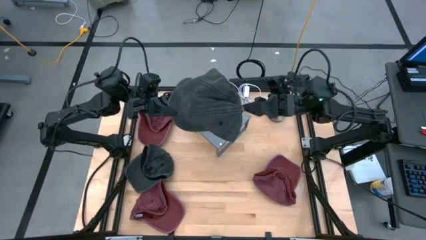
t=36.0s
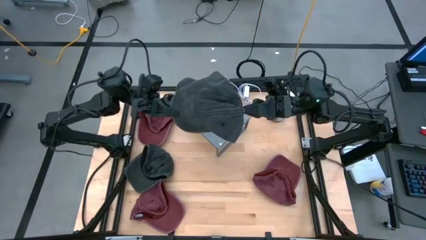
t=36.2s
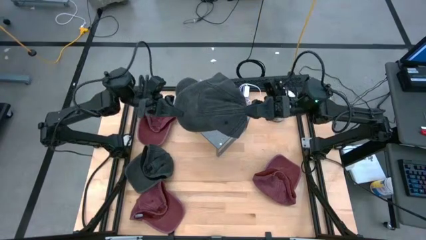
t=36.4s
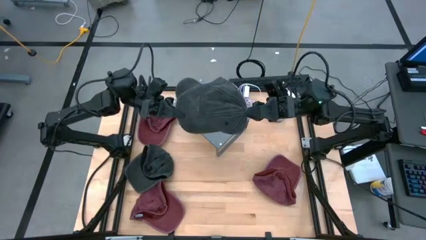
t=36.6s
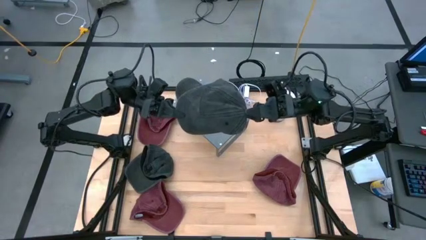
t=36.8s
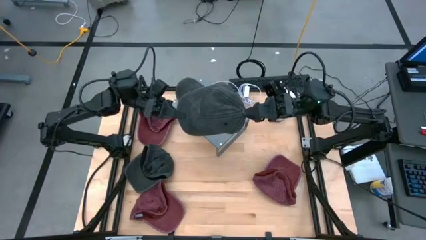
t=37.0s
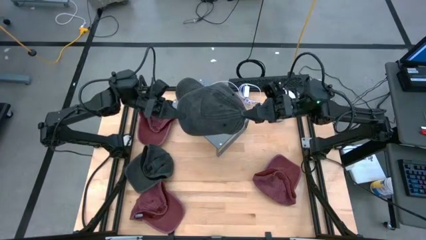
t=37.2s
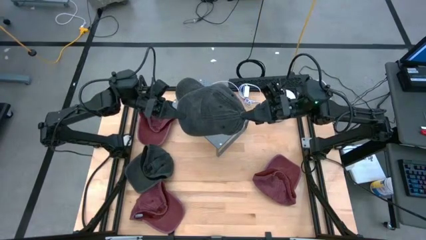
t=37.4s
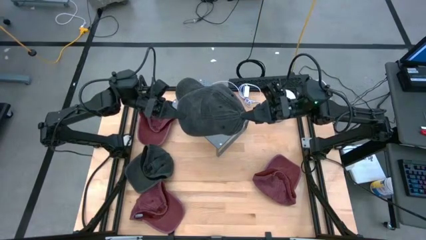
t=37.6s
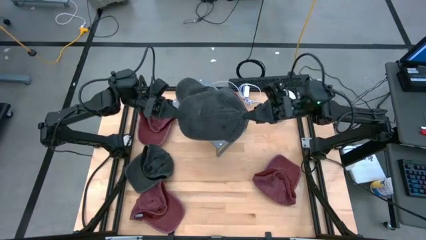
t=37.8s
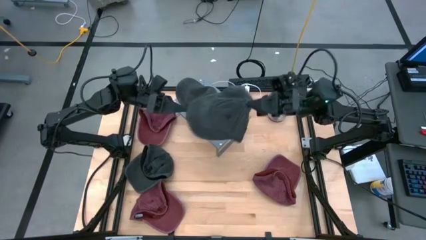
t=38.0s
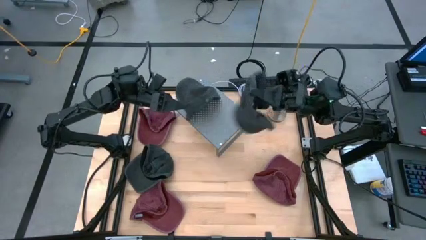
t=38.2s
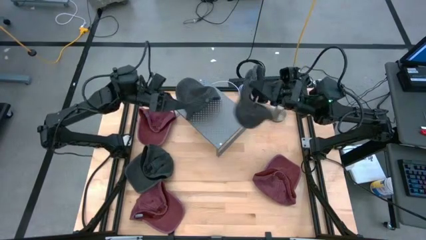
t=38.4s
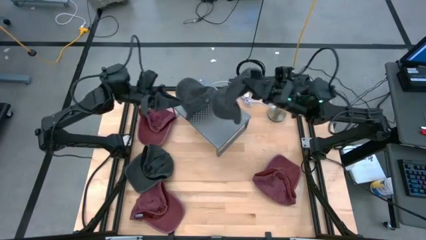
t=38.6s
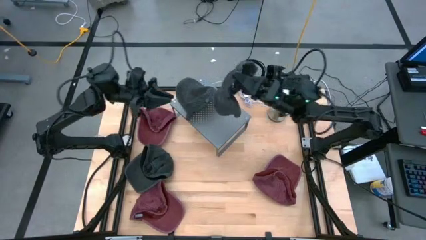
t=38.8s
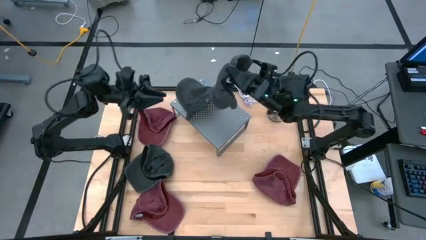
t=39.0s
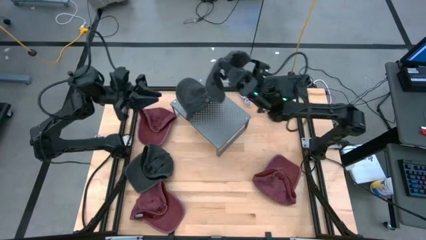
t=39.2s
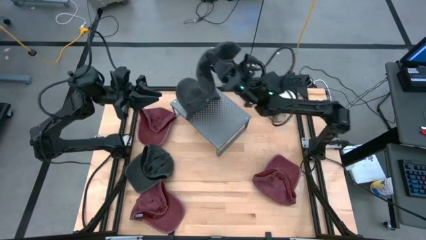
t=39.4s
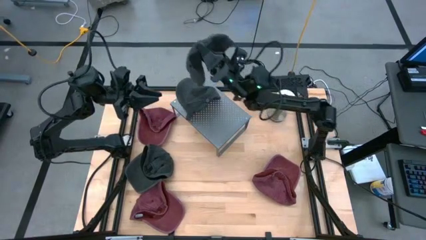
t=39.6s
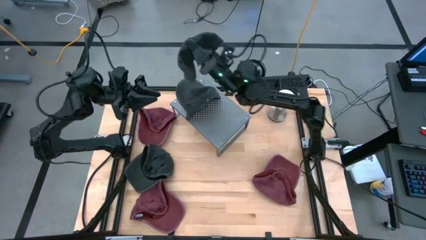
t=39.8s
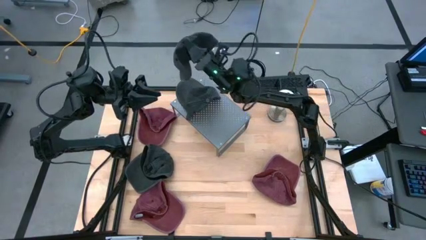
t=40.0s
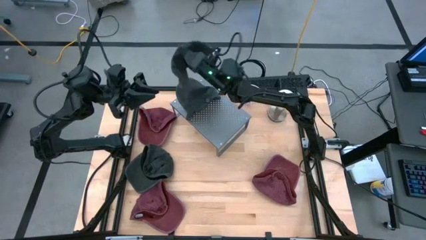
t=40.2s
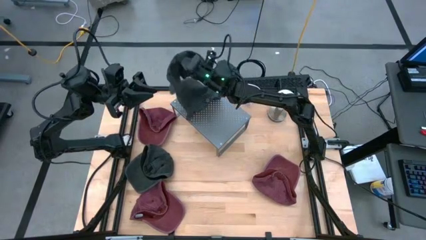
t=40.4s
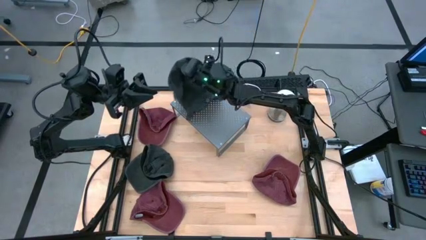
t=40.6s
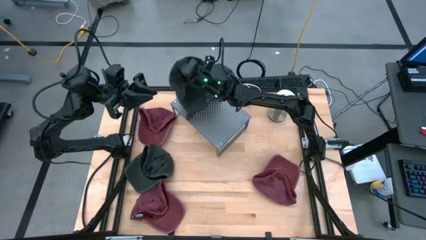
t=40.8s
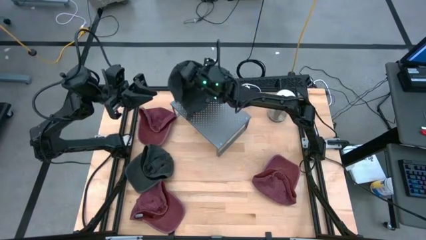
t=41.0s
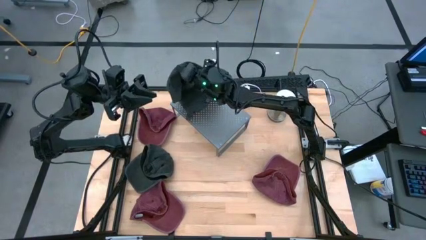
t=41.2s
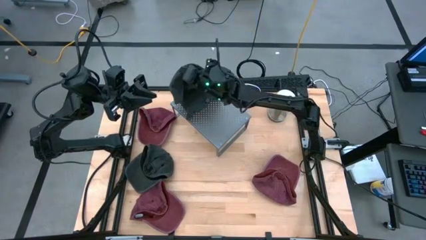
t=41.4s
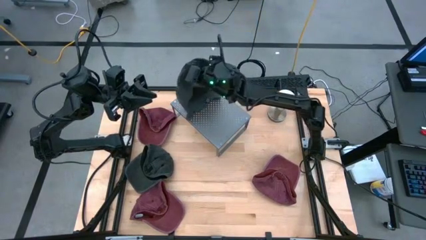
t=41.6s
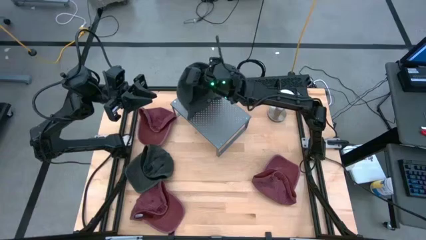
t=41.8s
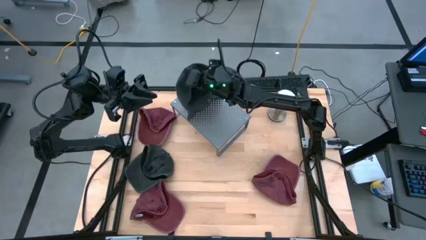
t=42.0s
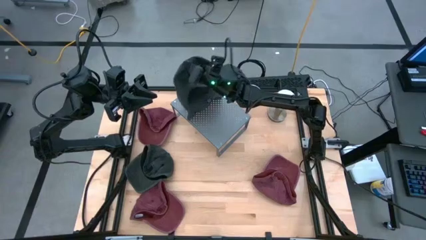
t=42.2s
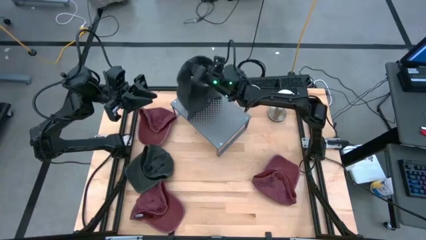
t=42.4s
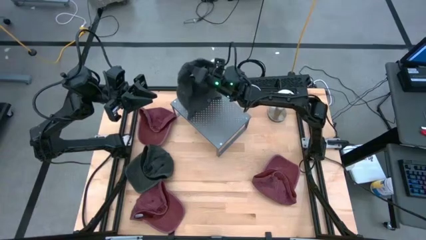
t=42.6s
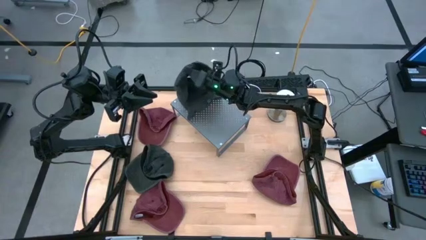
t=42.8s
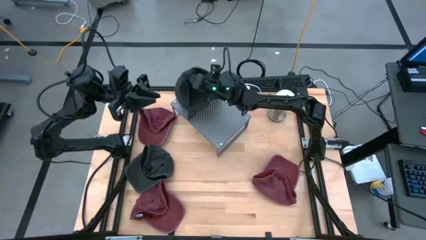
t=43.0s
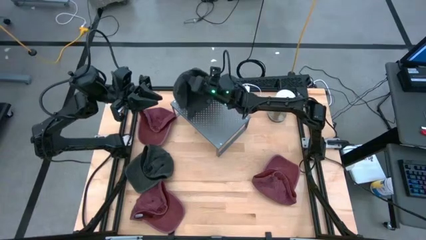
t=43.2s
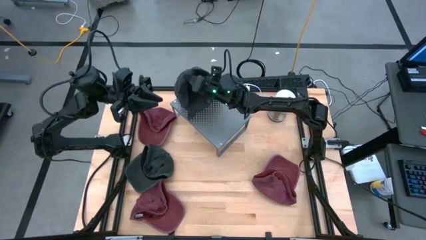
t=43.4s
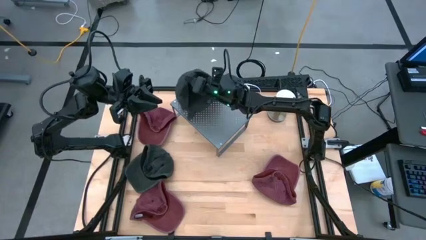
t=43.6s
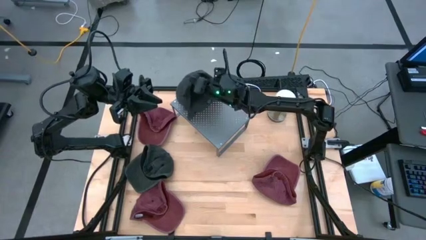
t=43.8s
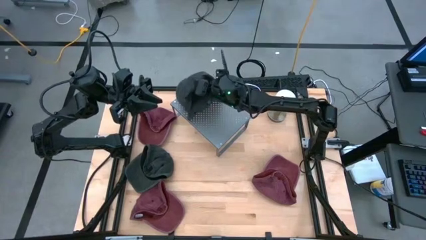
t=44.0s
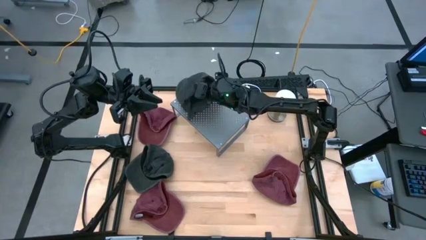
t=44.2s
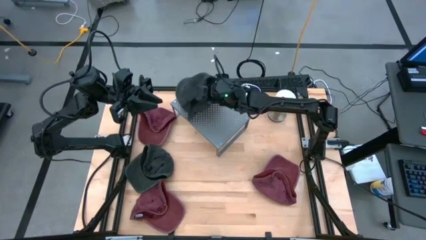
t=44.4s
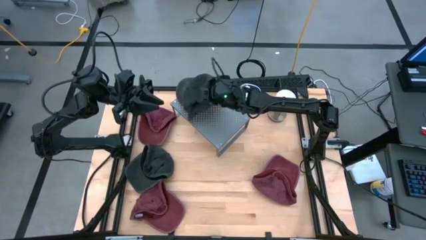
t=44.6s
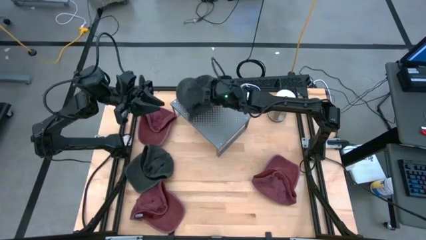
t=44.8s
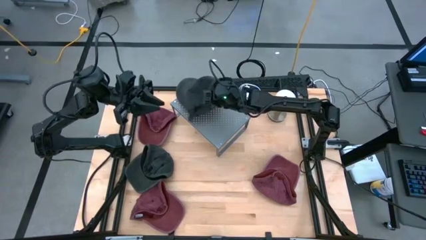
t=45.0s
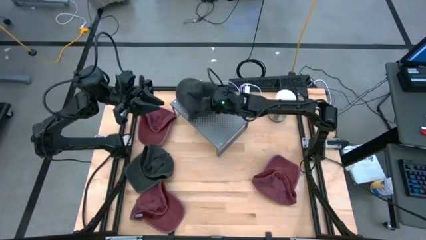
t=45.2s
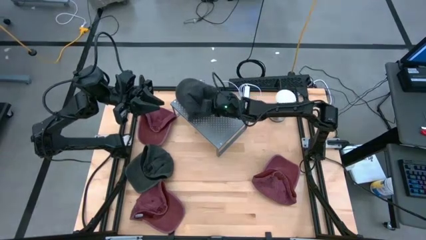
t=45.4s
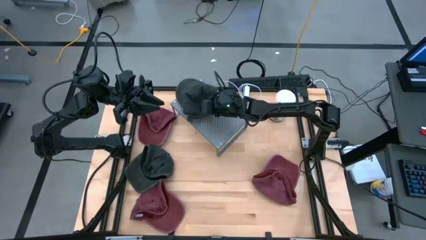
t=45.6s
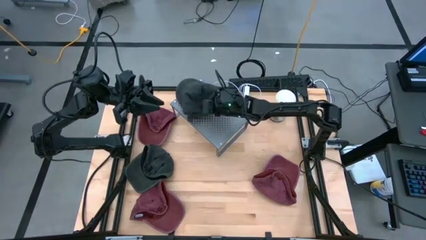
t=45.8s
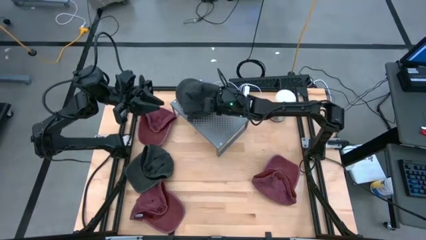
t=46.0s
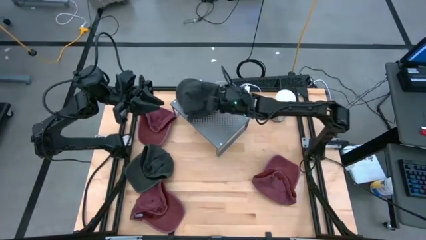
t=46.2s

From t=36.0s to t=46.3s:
Task: Pick & Place hat
Stack the bottom black cap on the black cap on the shelf

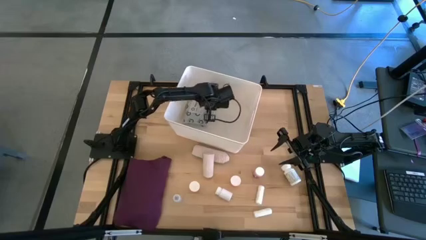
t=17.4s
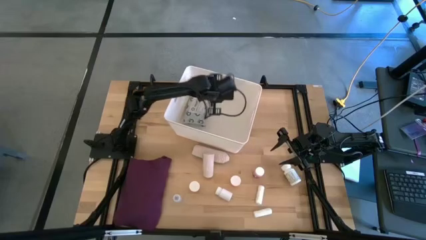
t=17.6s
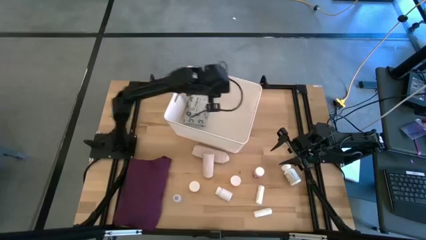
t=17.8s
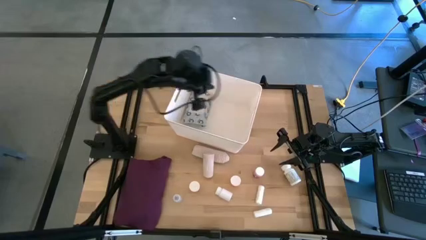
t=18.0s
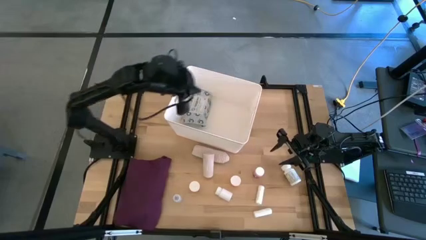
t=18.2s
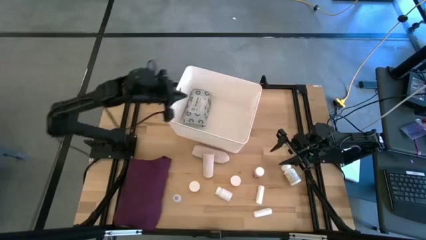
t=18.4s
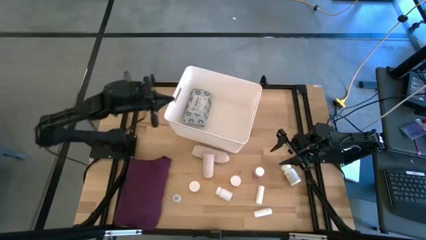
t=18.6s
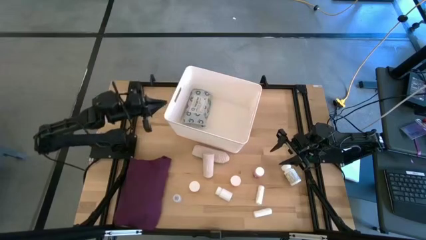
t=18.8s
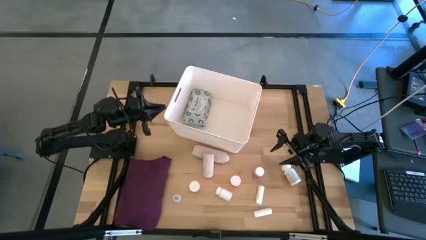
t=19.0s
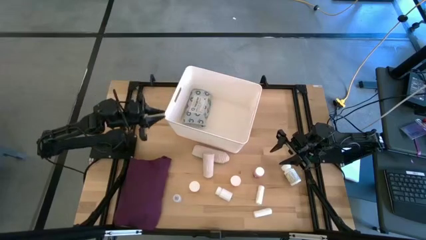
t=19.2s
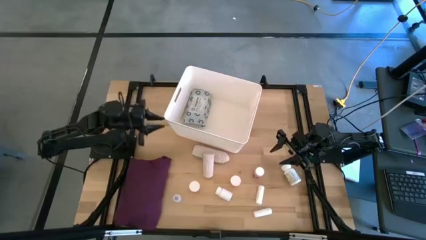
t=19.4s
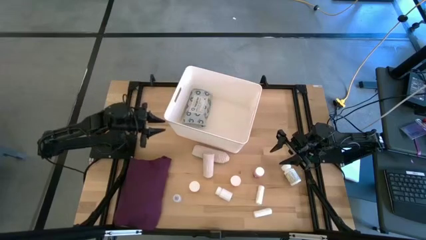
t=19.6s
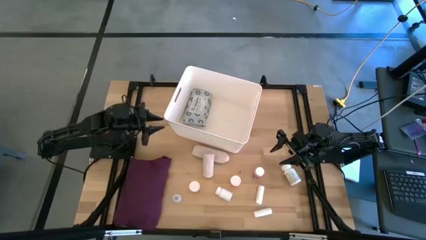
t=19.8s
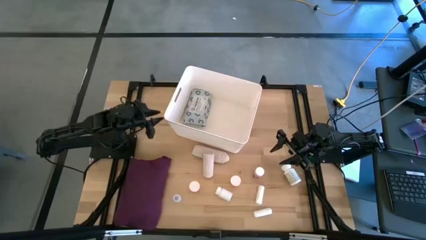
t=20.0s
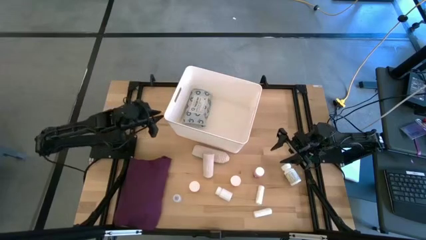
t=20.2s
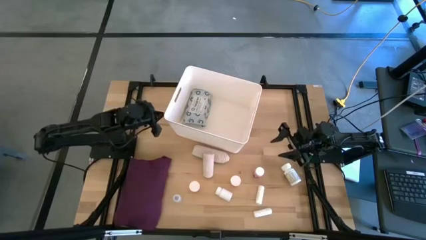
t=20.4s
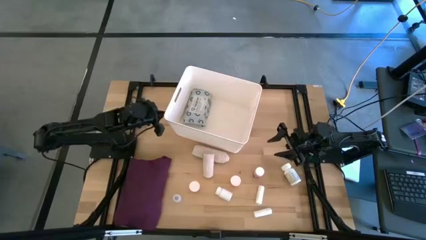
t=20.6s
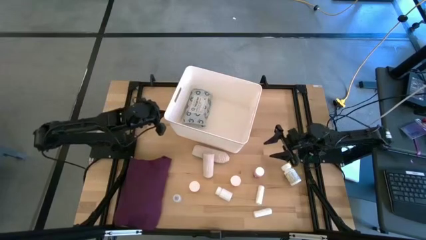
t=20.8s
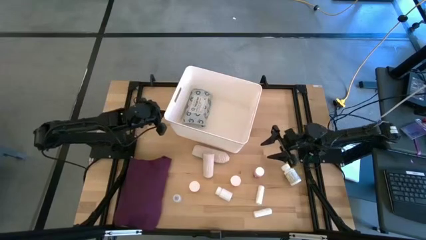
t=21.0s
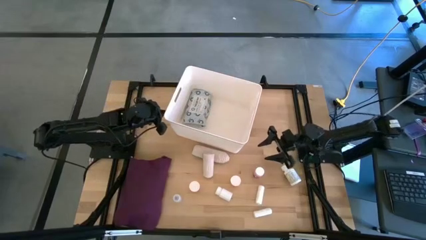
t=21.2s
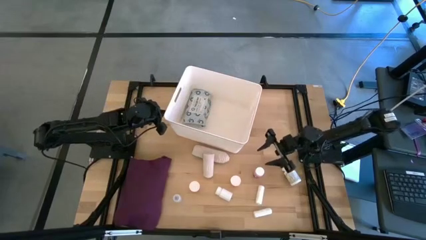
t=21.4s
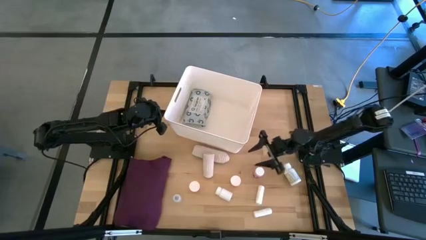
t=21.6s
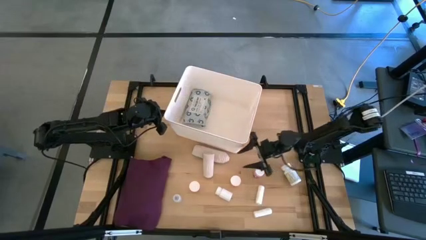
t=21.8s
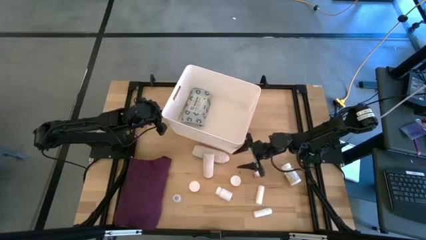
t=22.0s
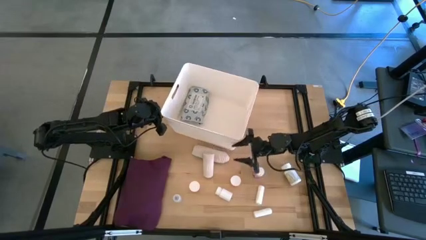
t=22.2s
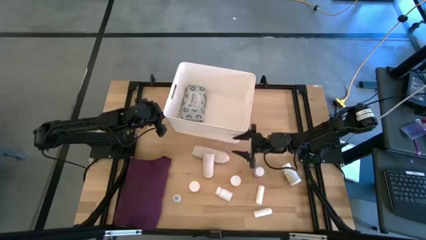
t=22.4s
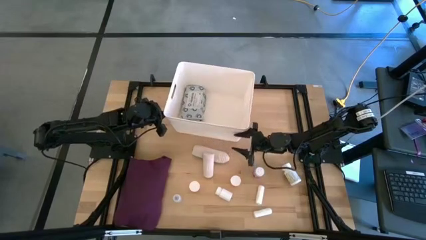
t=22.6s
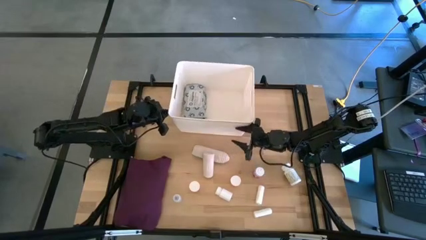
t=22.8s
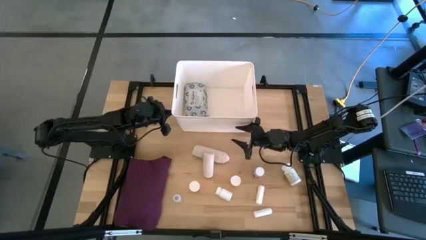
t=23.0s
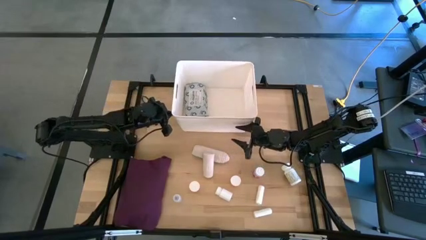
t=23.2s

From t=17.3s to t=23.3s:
Task: Pick & place medical supplies in basket/bin
Move the white bin to the top middle of the table
